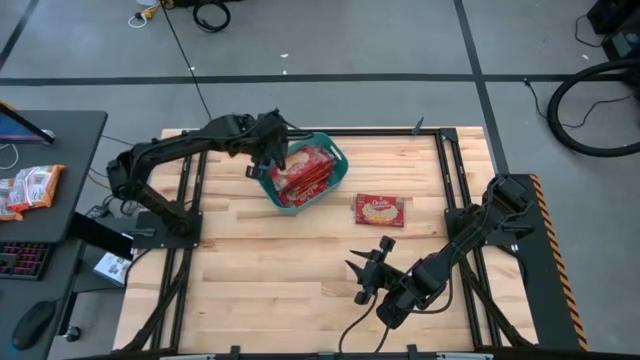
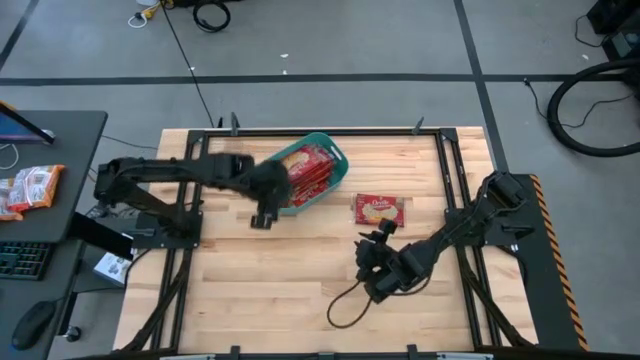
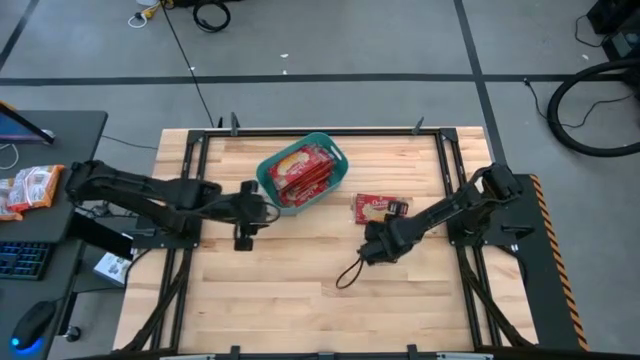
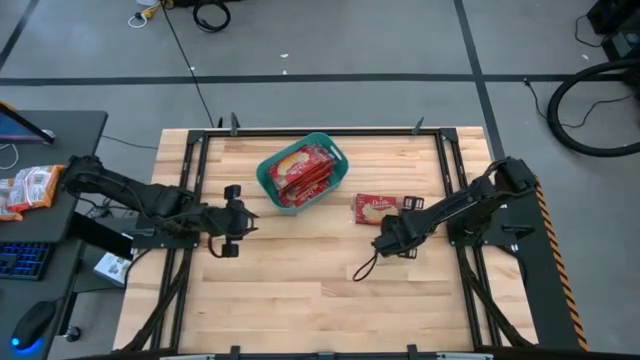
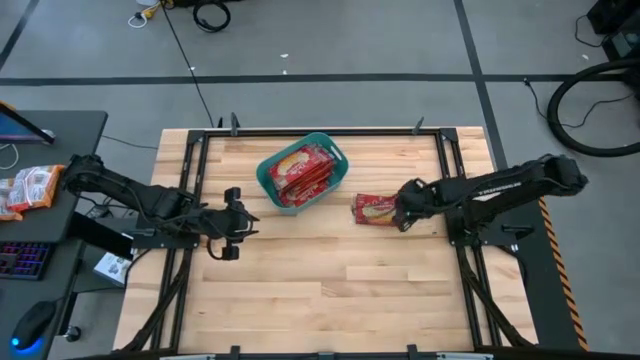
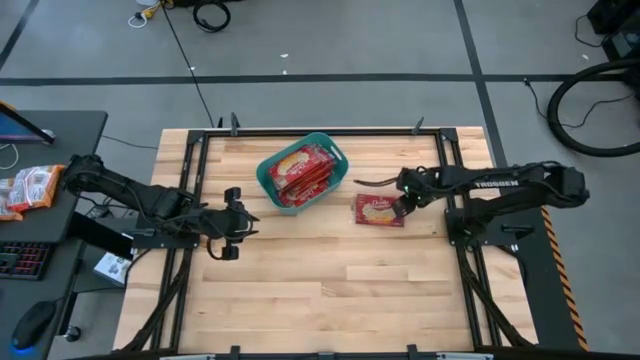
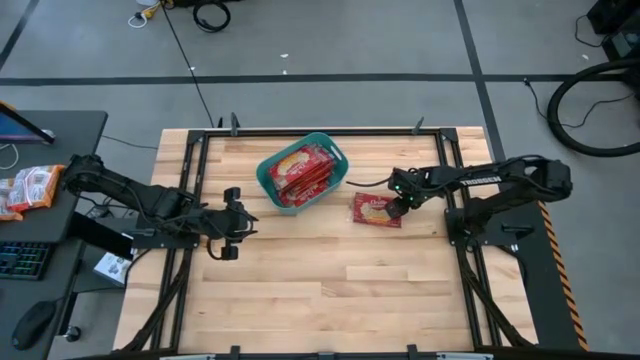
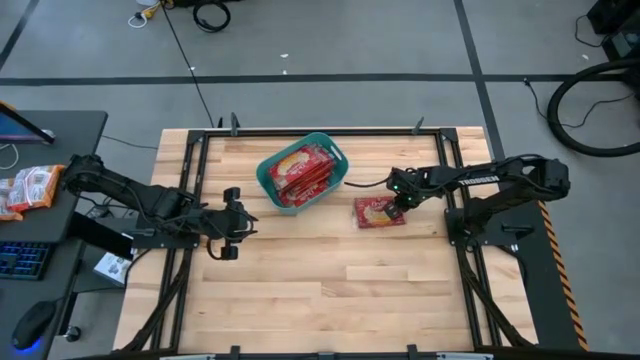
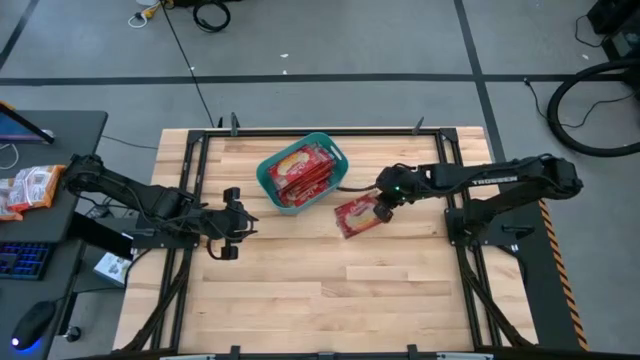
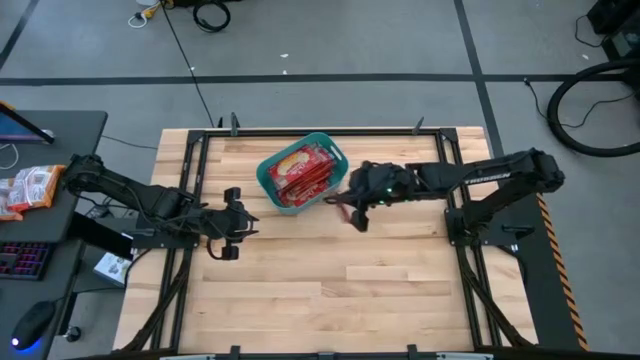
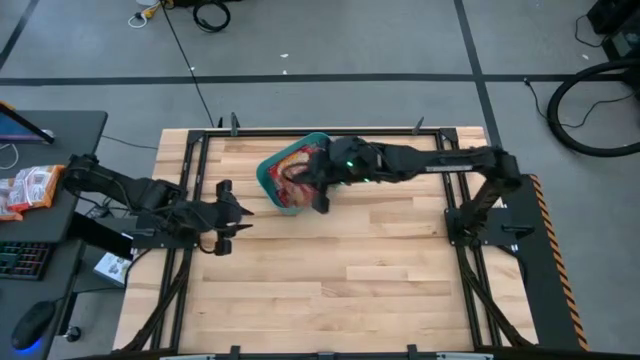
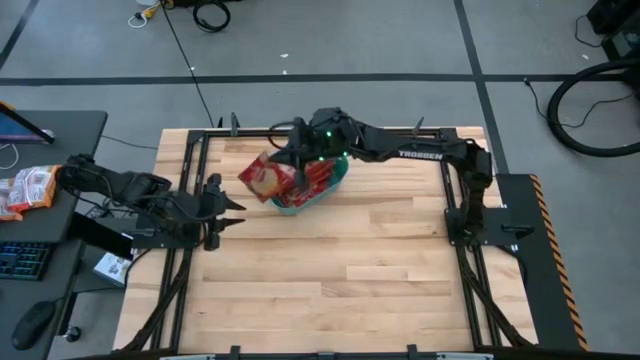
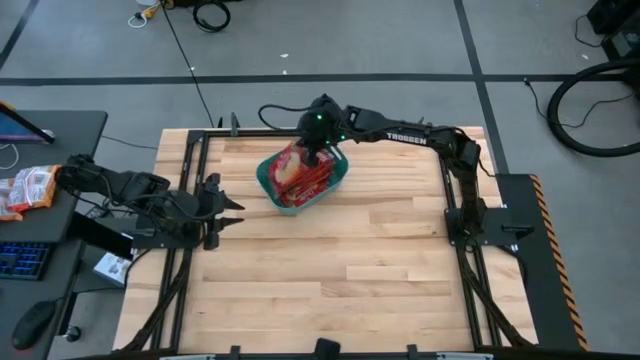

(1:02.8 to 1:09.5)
Task: Sort popcorn bags into baskets
Put the red popcorn bag into the green bin

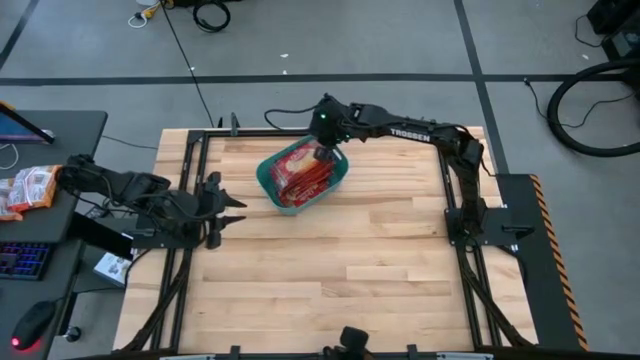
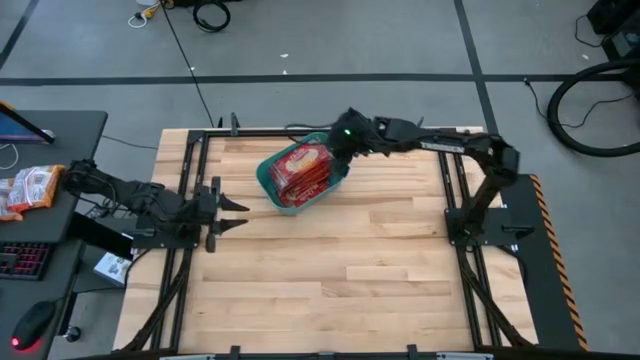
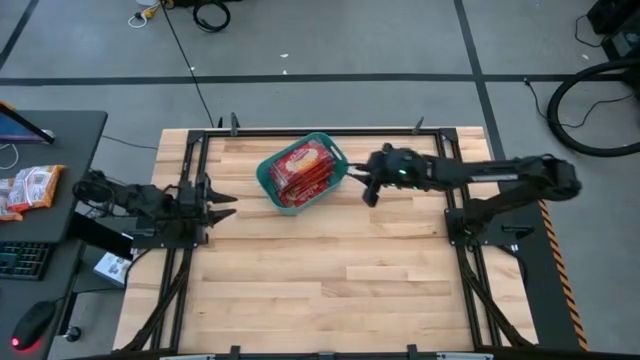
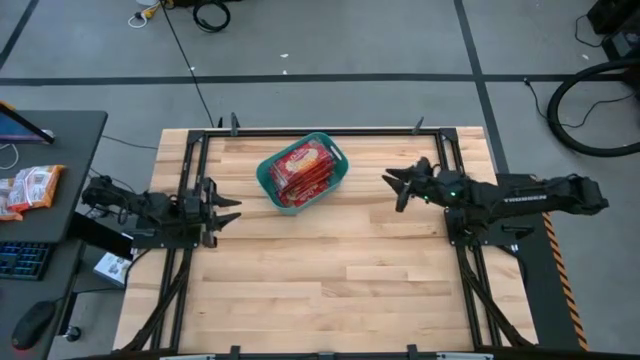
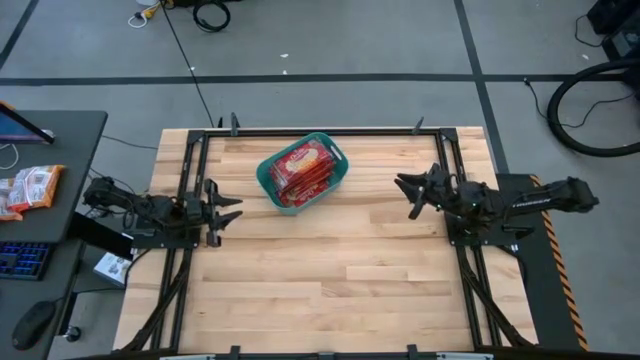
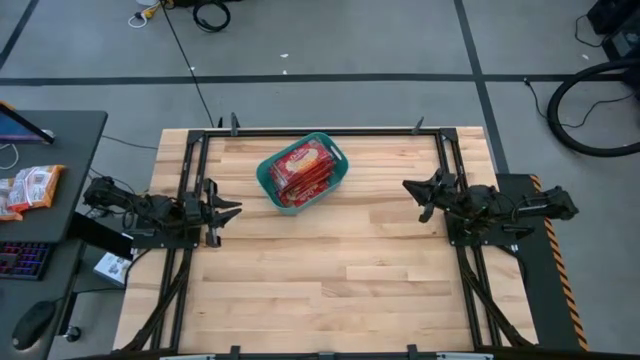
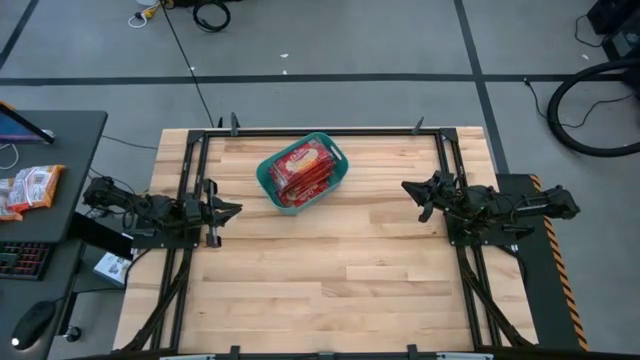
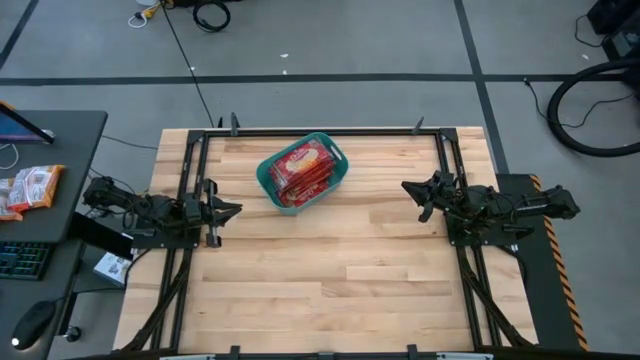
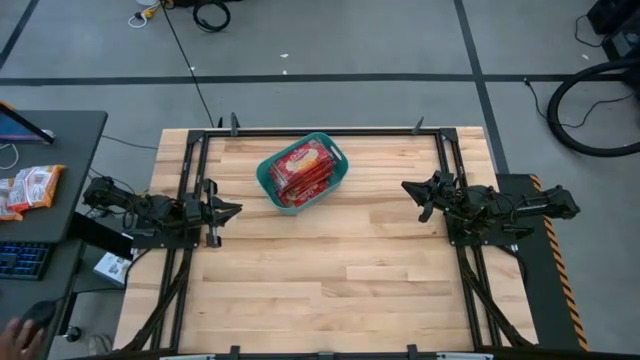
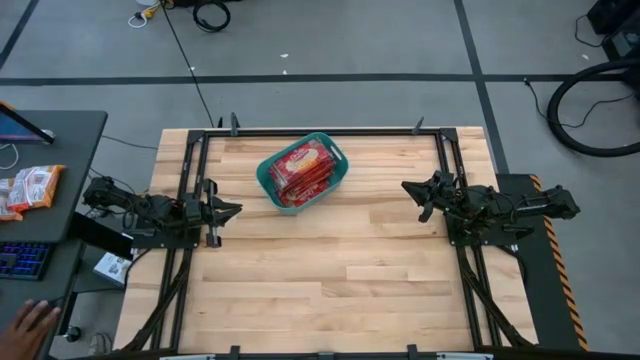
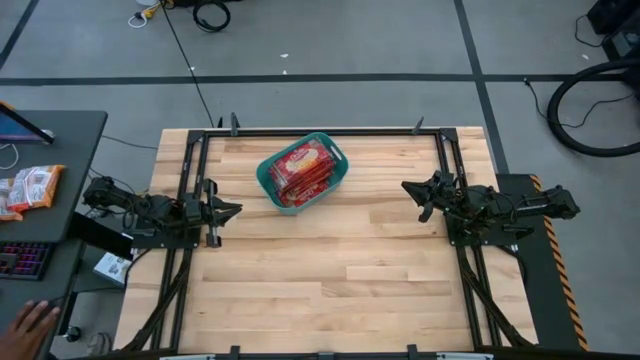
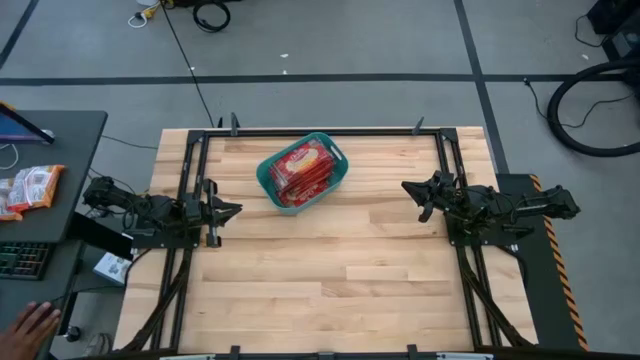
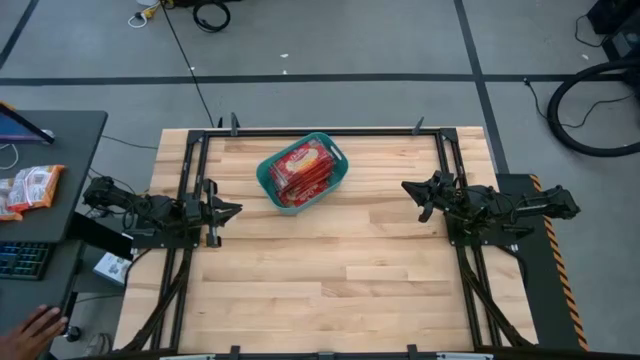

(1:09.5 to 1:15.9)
Return to Home Position

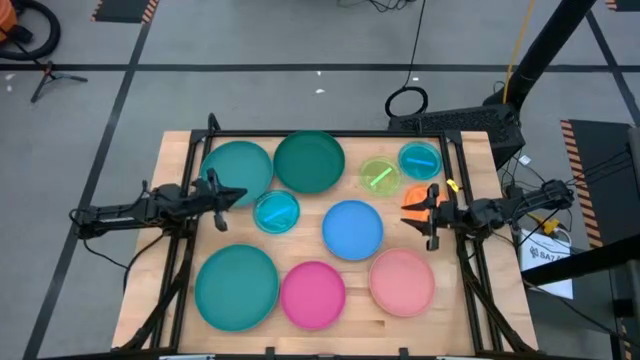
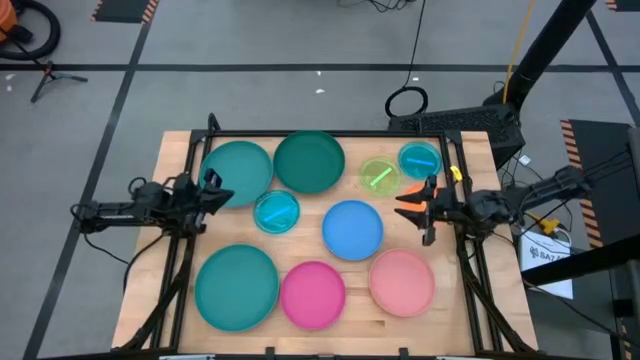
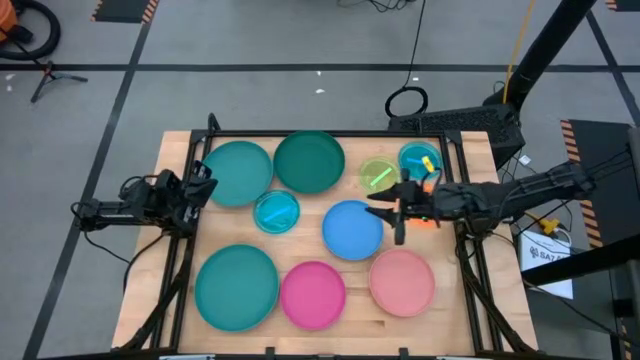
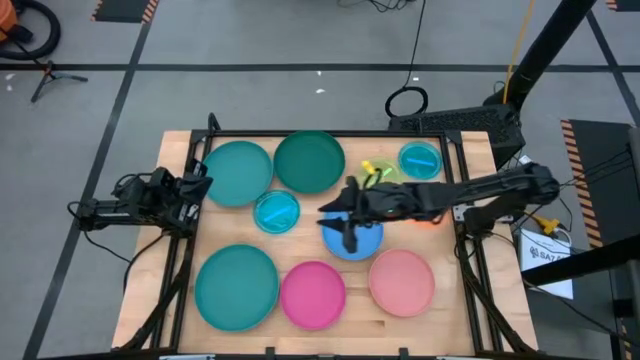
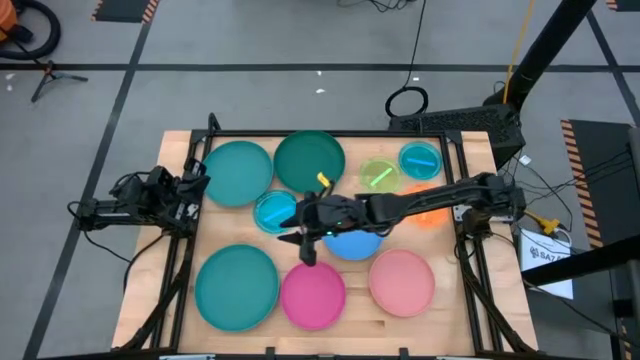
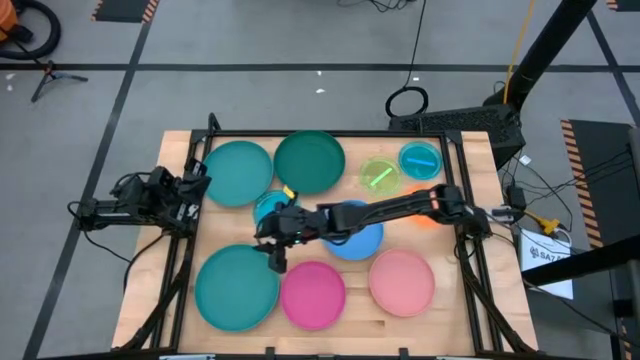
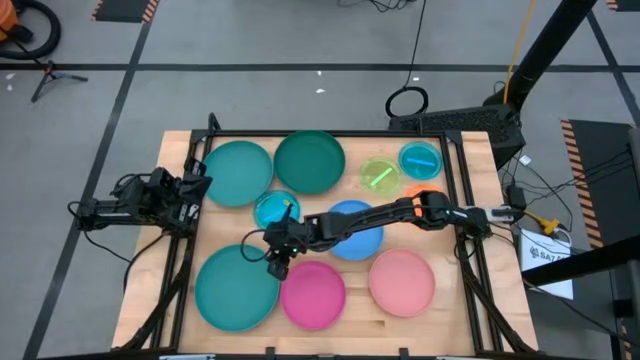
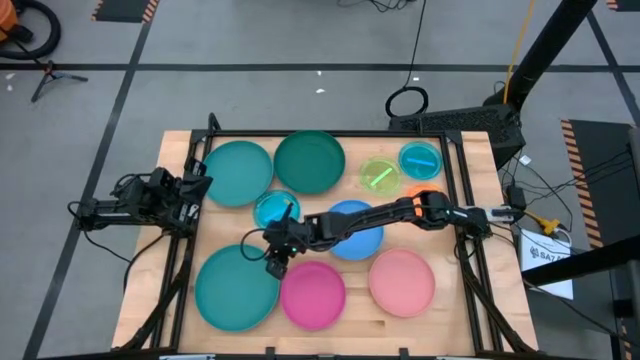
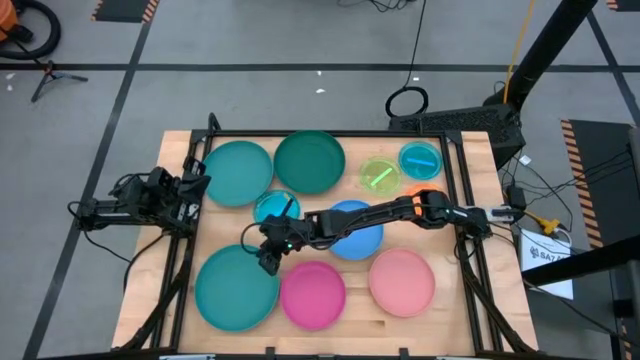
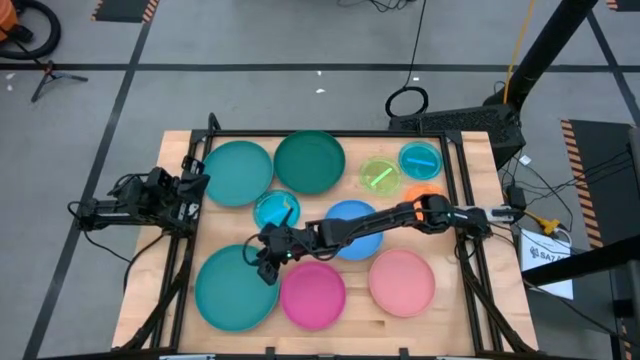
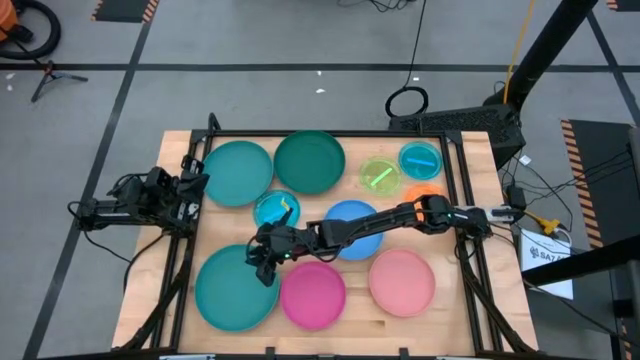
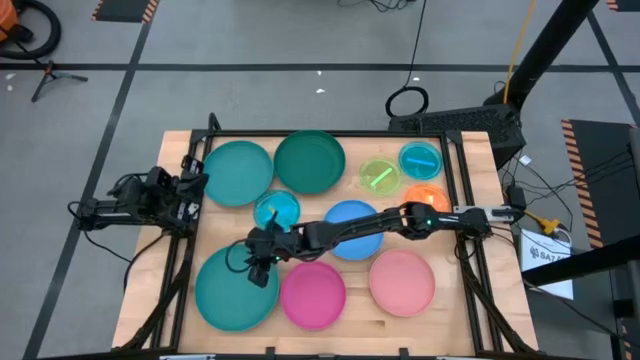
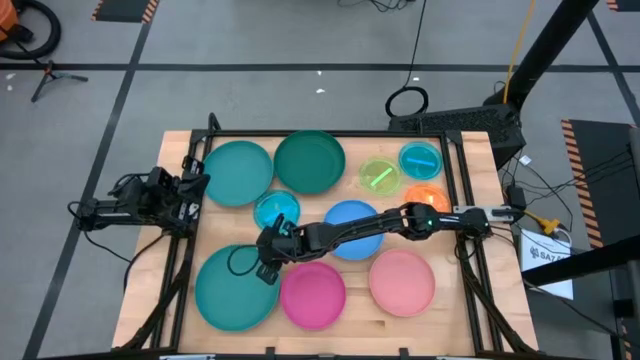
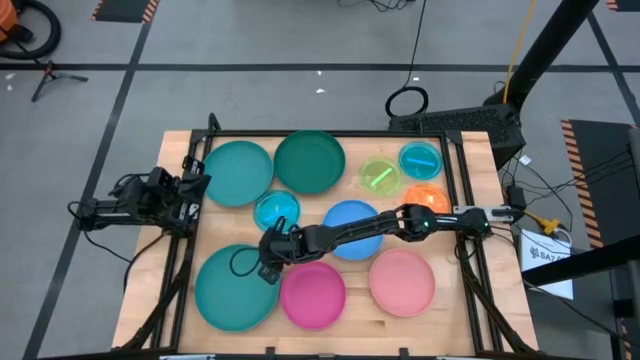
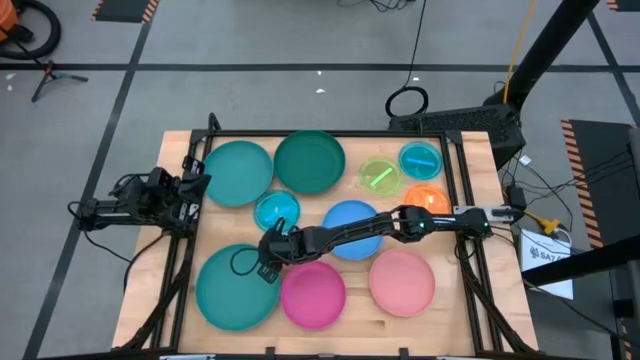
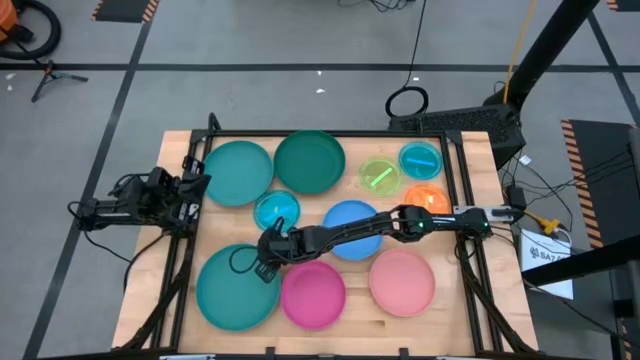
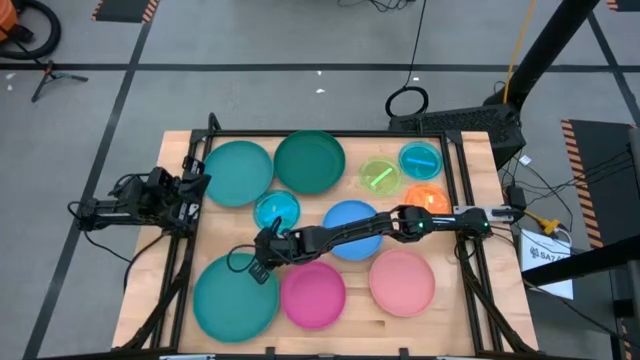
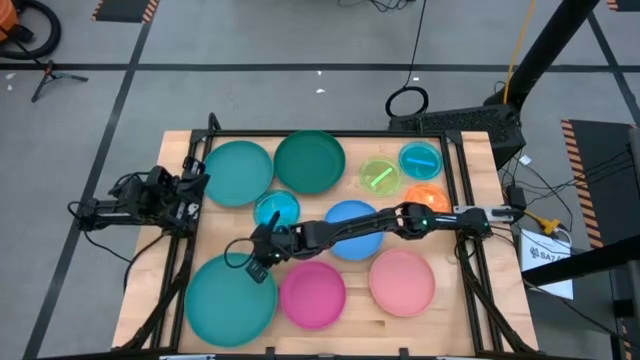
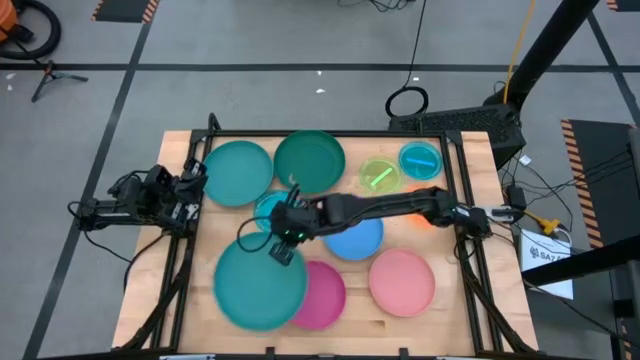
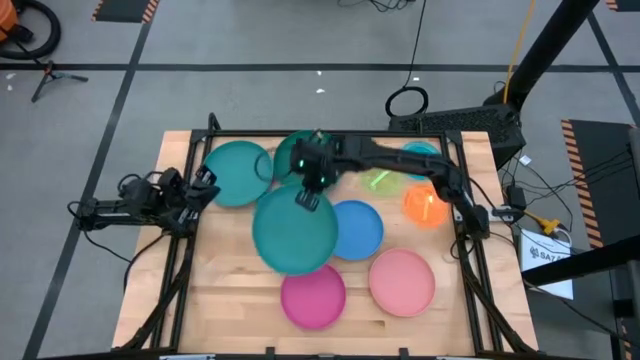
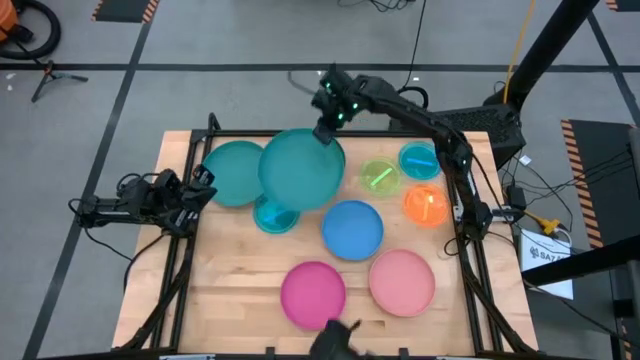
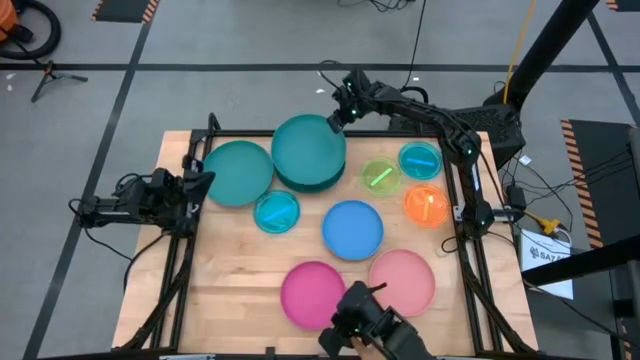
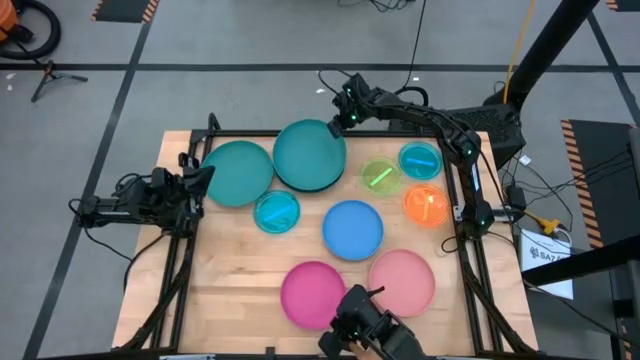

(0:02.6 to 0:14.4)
Task: Stack plastic plates
Stack the bottom green plate on top of the dark green plate
